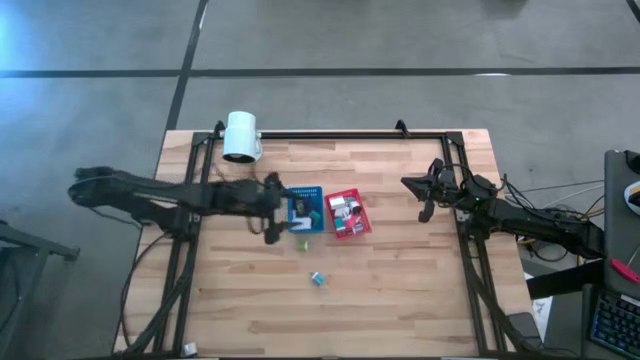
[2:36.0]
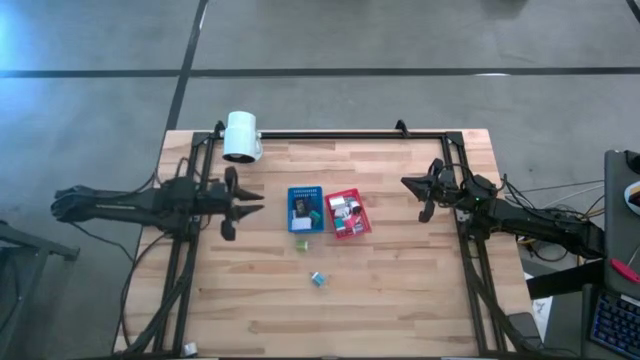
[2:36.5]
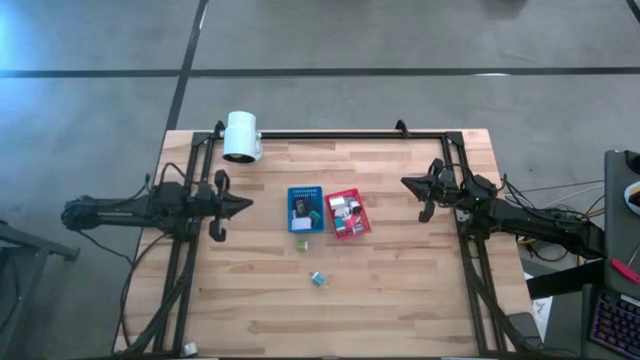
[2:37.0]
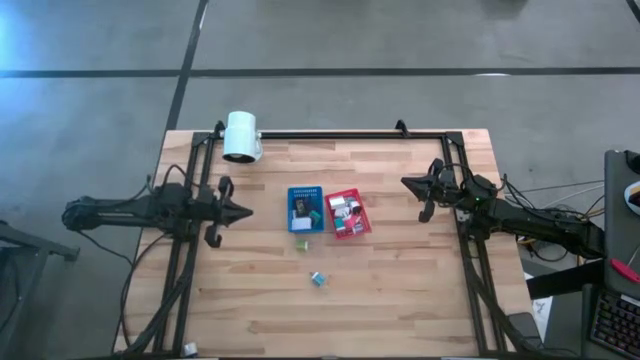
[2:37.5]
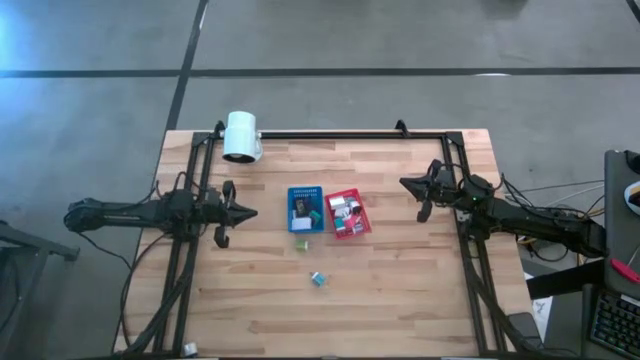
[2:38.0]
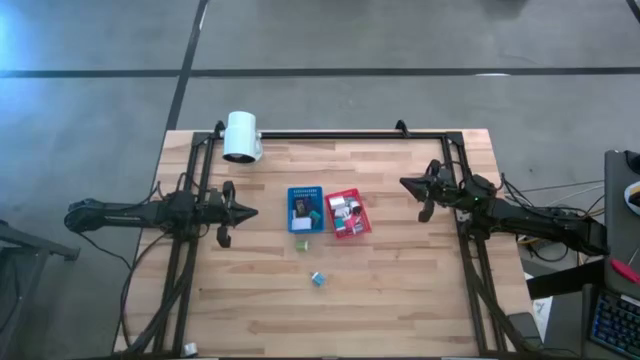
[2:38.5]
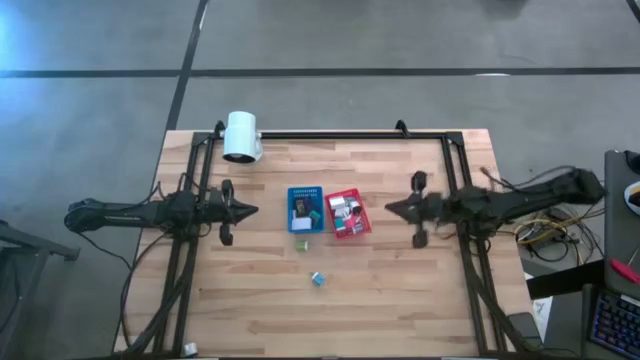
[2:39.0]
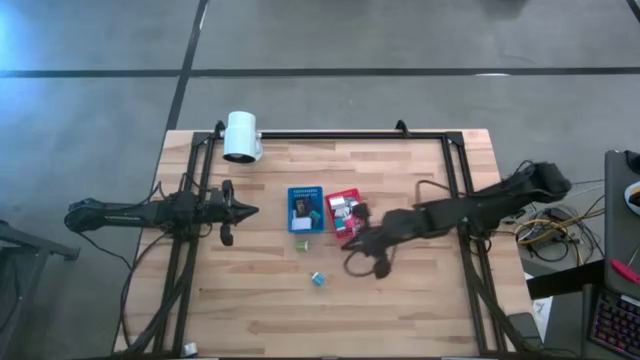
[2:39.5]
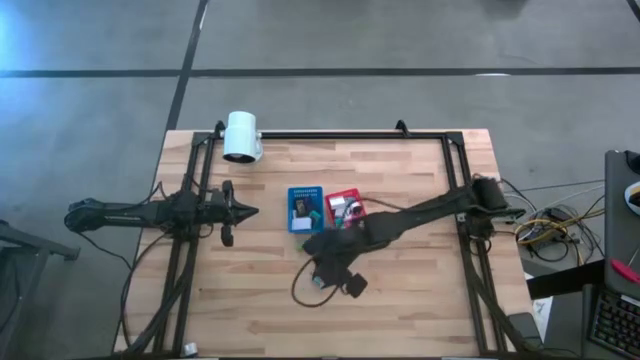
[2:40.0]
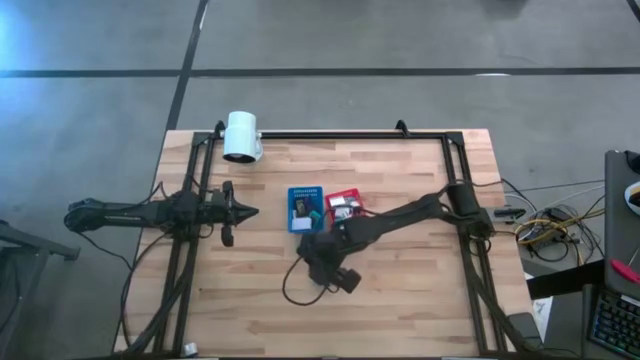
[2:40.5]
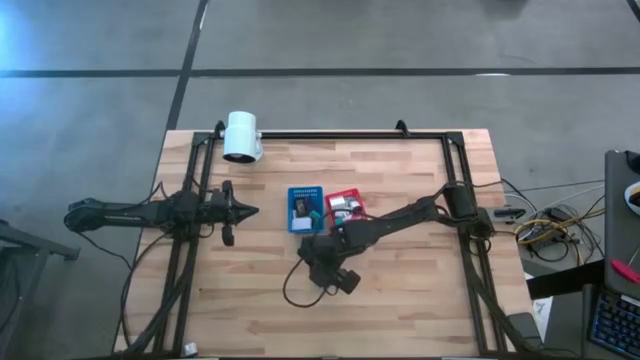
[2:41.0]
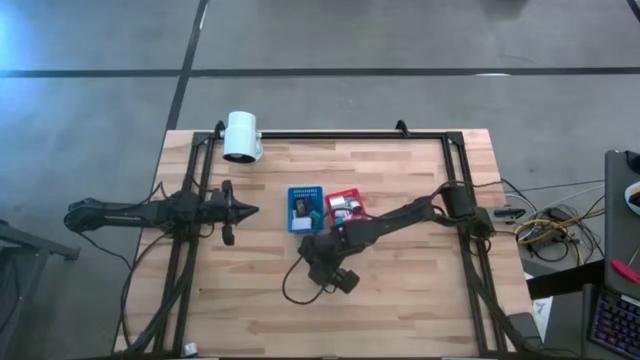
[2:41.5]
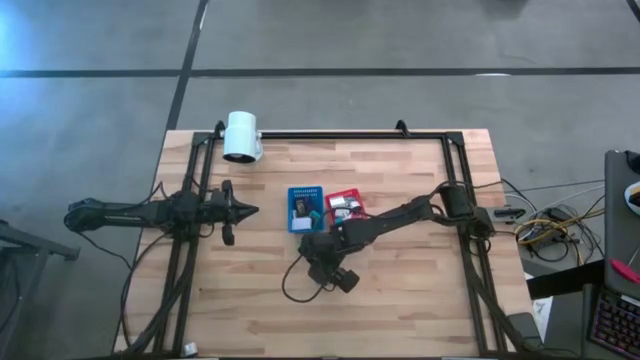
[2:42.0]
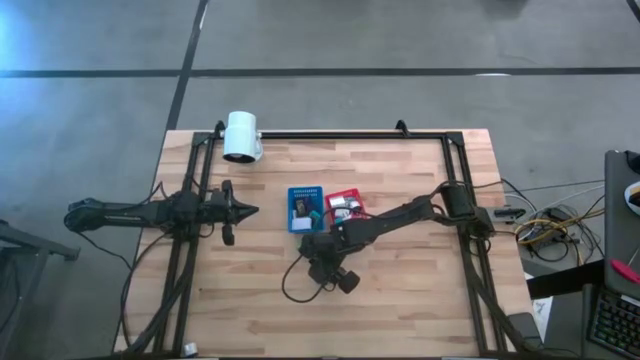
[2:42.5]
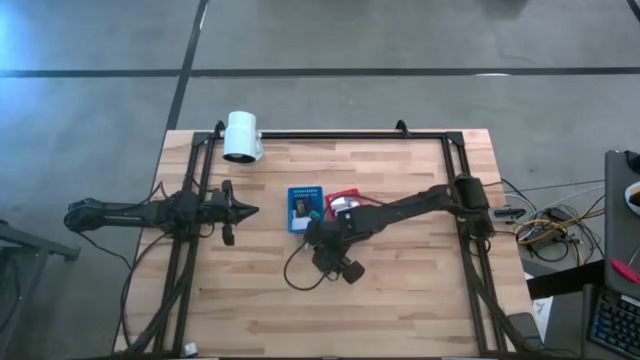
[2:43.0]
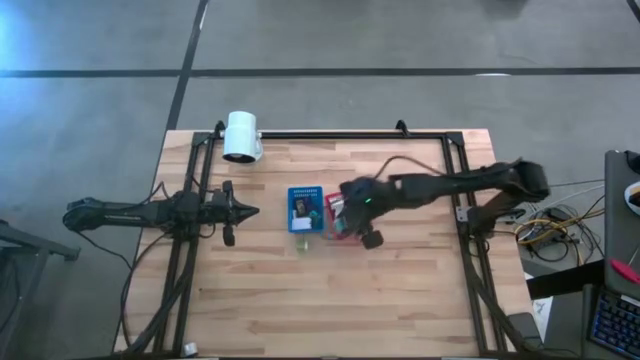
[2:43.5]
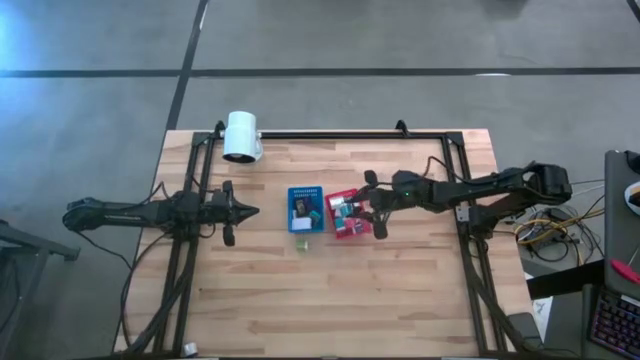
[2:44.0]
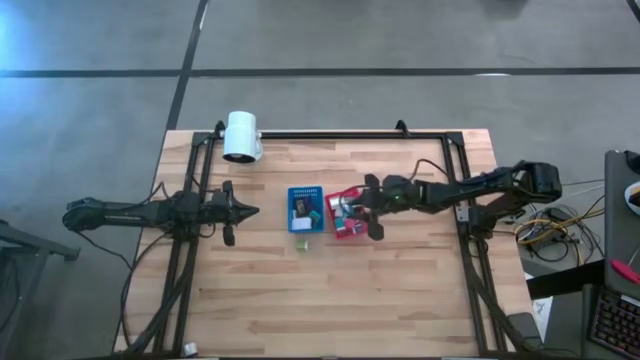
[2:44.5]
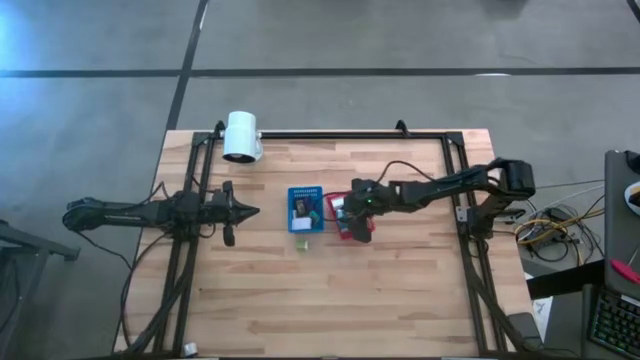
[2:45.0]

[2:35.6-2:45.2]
Task: Pick & Place Office items
Put the blue charger adapter into the red bin

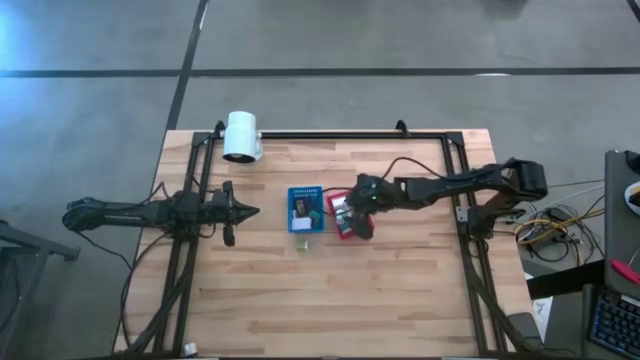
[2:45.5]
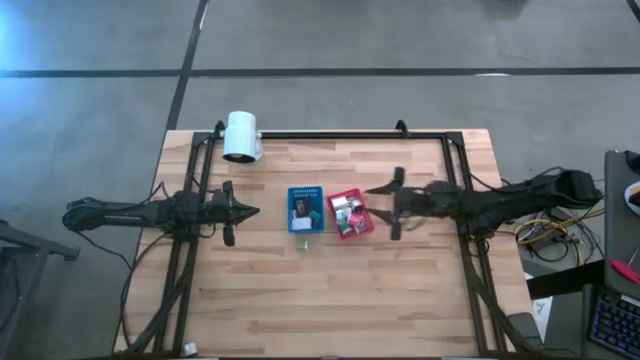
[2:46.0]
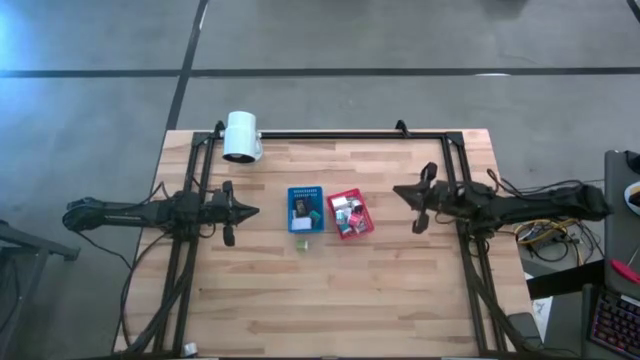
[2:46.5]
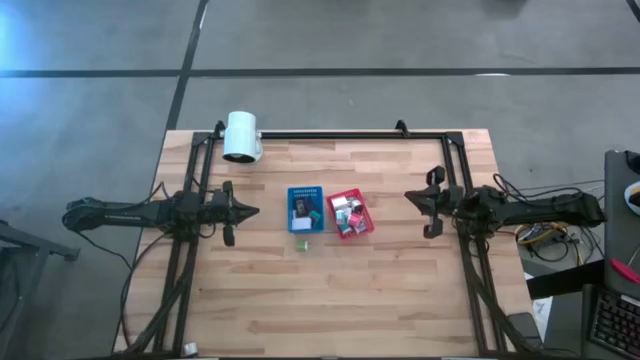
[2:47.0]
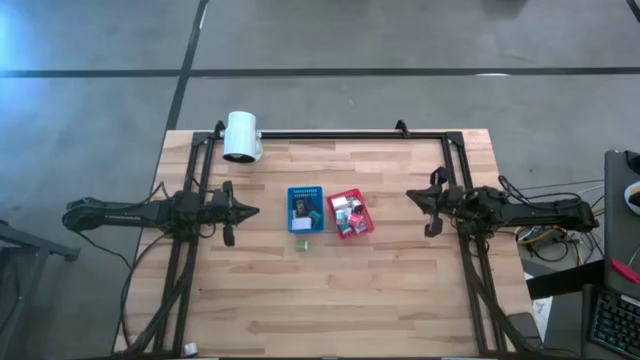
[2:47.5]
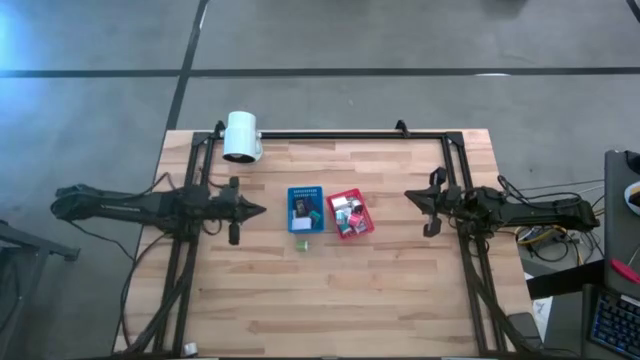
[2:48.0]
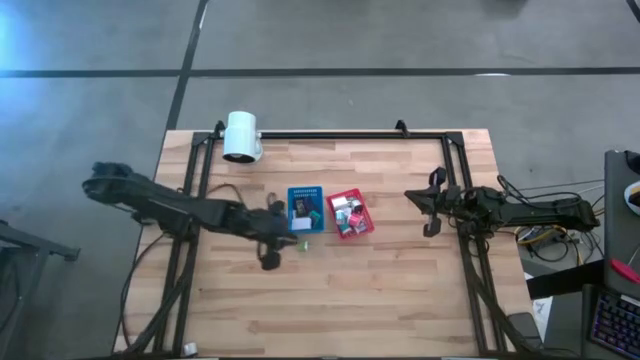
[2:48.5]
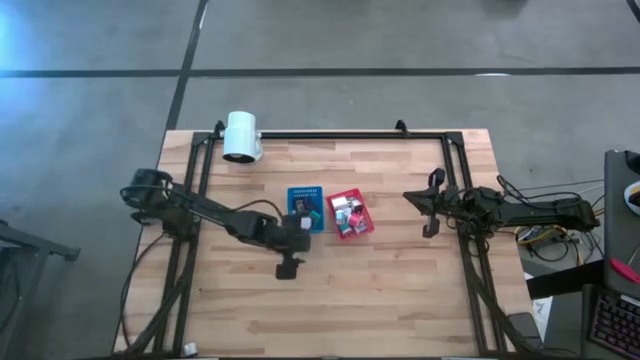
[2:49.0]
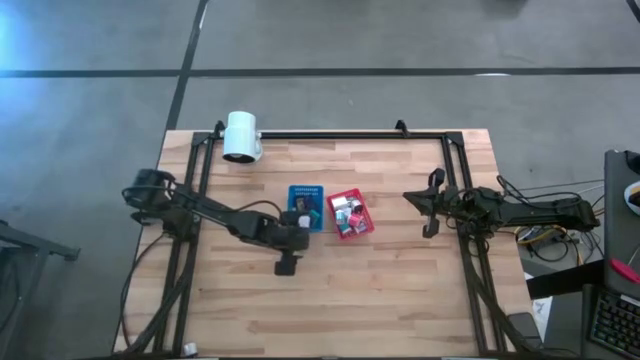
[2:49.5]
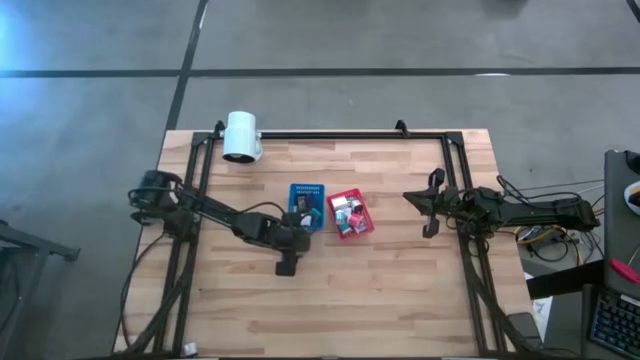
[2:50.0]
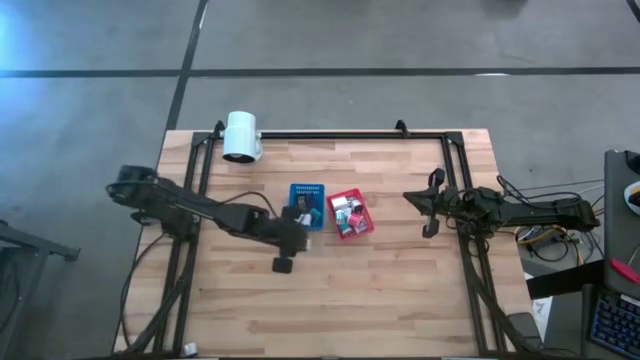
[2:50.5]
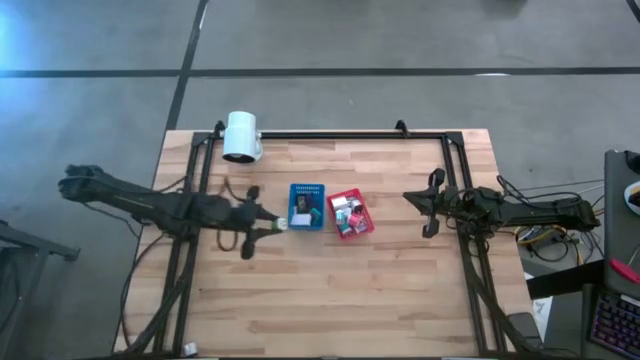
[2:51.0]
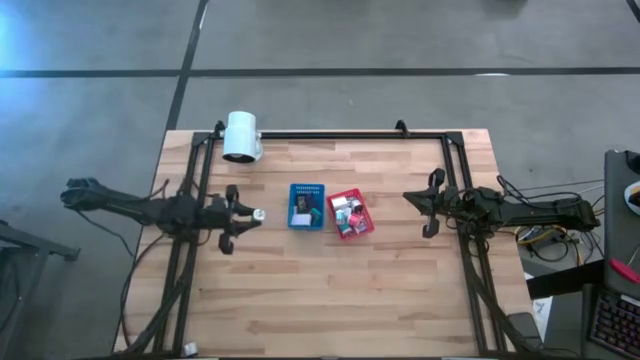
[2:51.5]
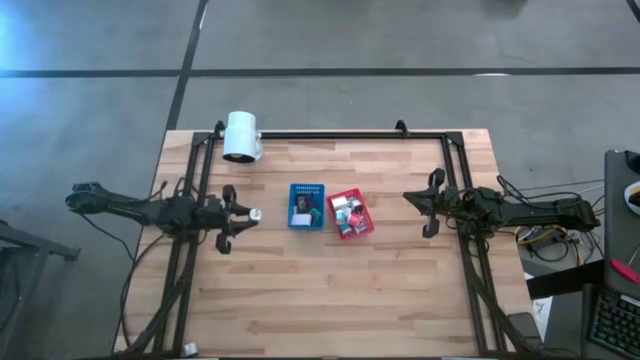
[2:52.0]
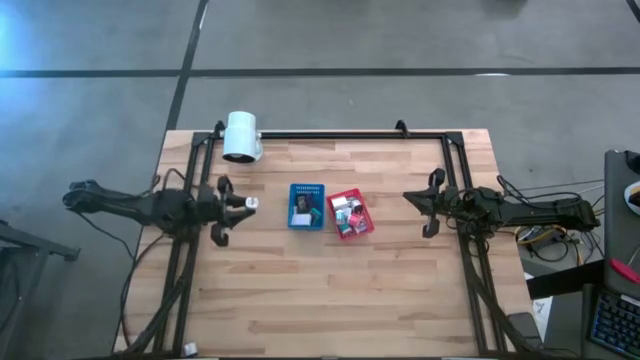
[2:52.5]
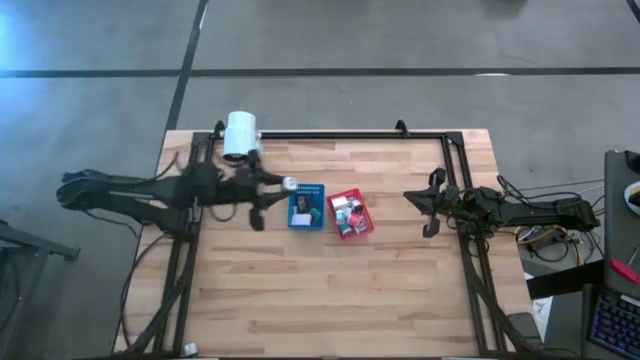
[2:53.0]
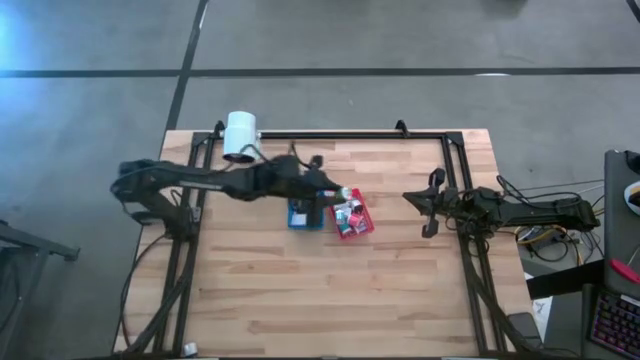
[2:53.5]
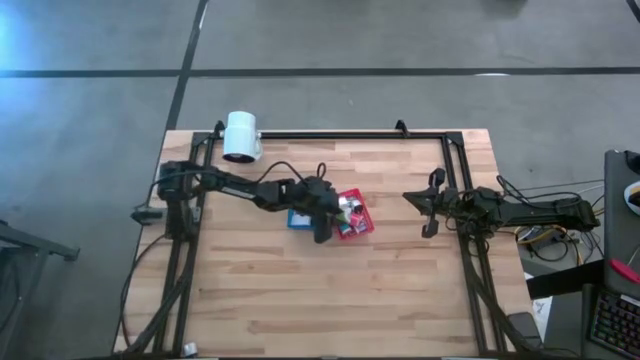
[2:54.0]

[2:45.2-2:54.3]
Put the green charger adapter into the red bin

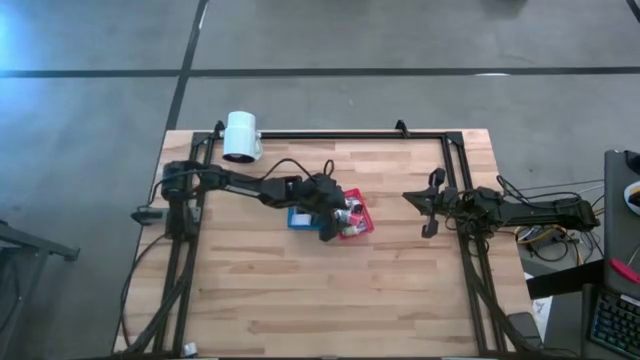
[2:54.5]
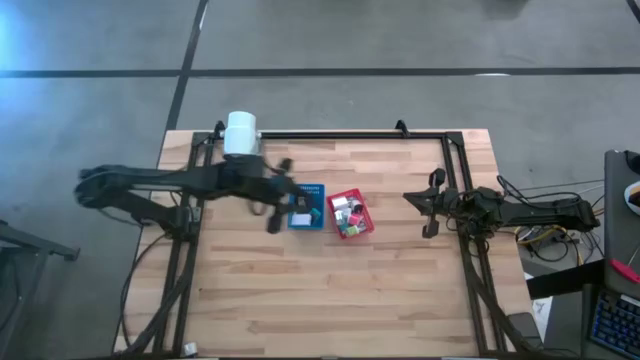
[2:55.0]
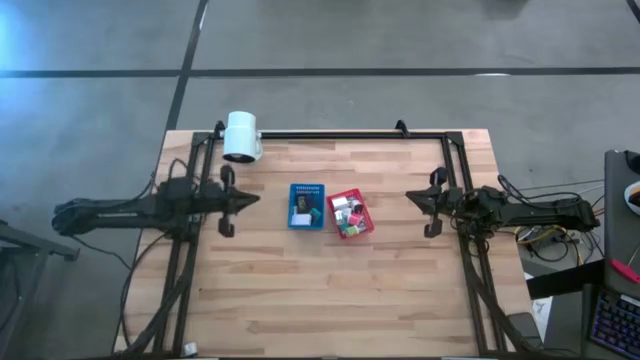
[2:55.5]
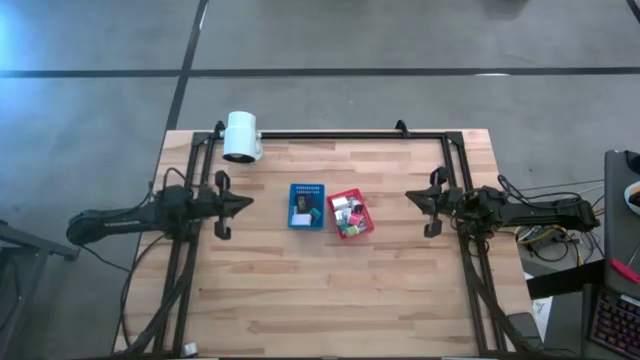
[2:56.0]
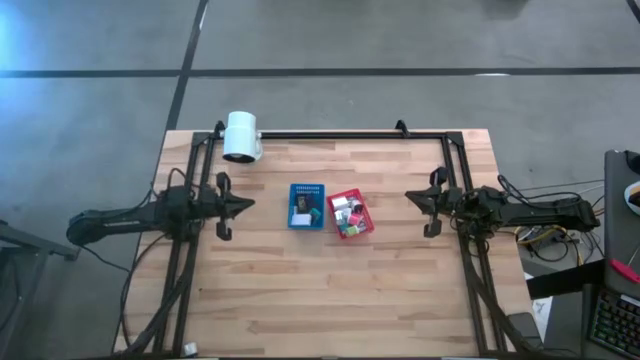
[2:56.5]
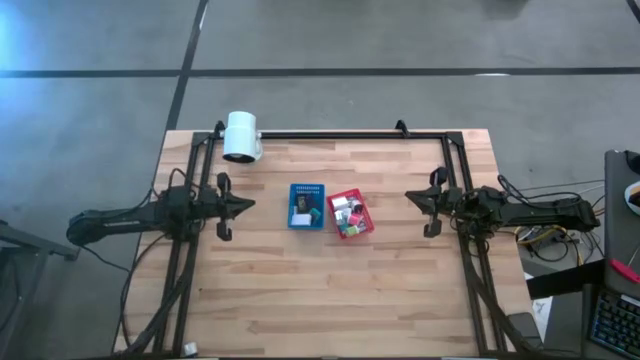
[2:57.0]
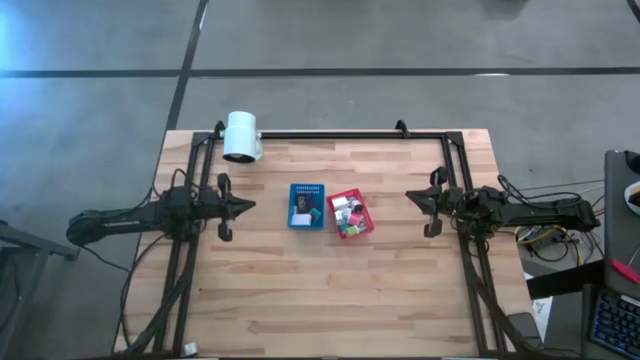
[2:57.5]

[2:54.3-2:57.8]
Return to home position
